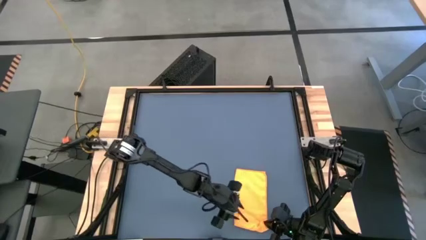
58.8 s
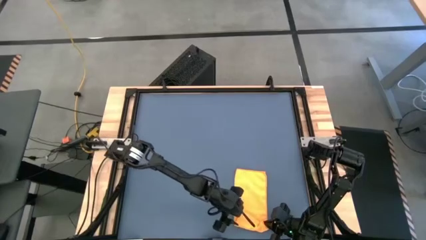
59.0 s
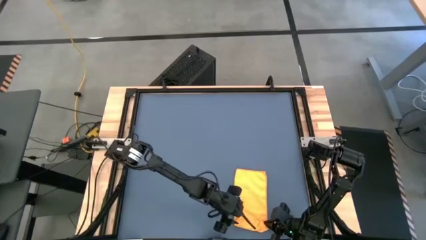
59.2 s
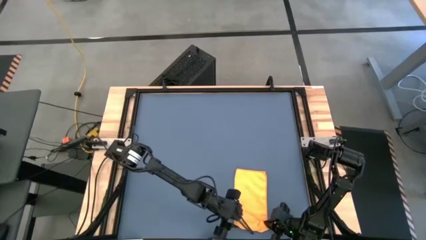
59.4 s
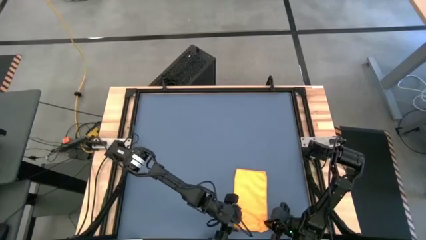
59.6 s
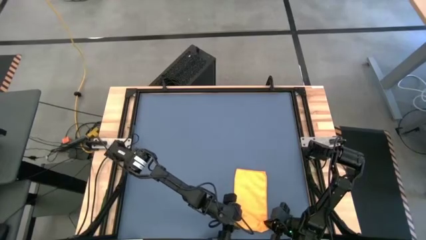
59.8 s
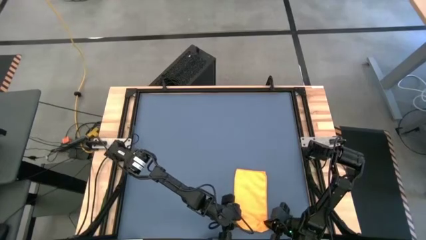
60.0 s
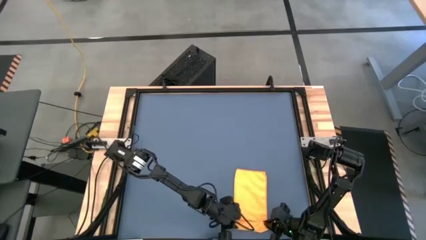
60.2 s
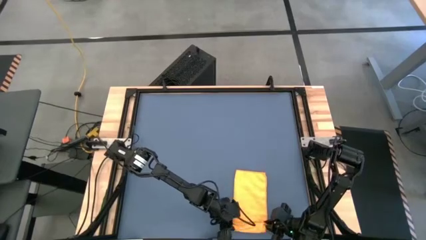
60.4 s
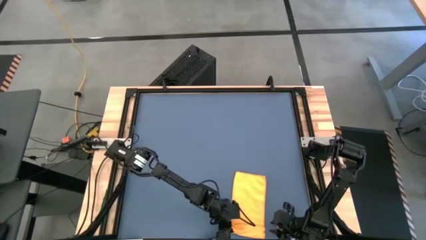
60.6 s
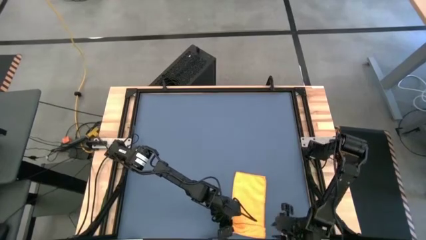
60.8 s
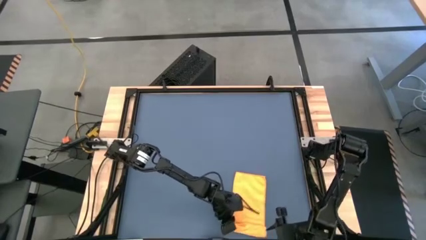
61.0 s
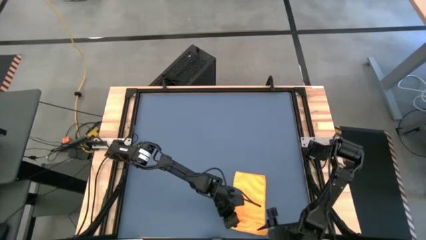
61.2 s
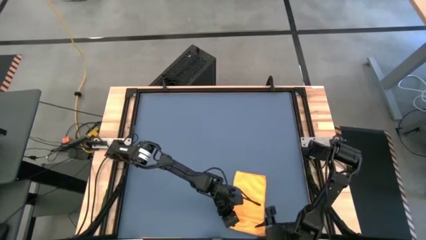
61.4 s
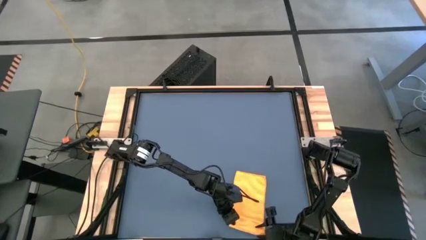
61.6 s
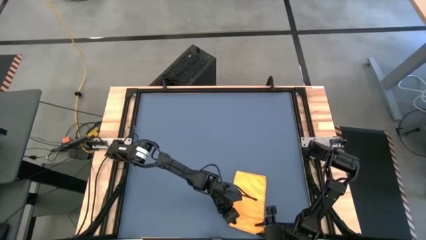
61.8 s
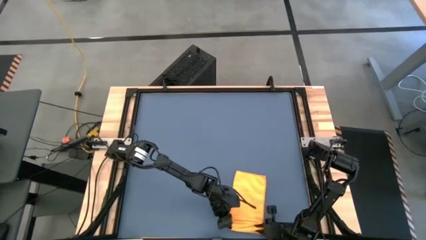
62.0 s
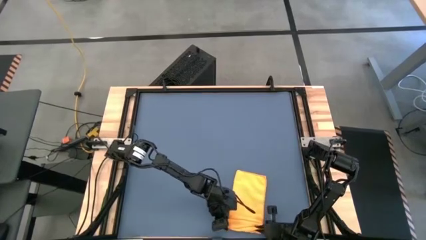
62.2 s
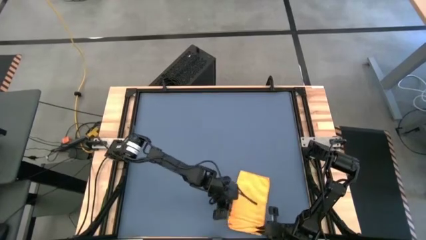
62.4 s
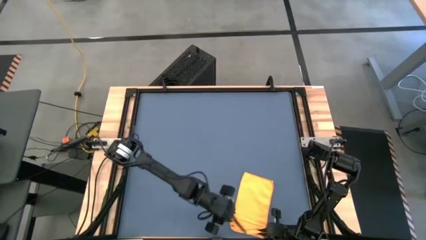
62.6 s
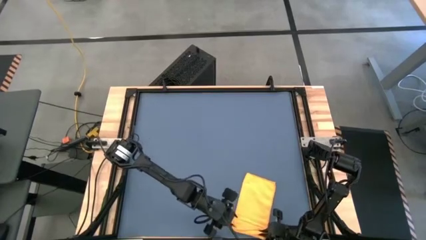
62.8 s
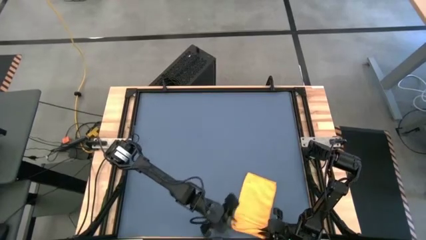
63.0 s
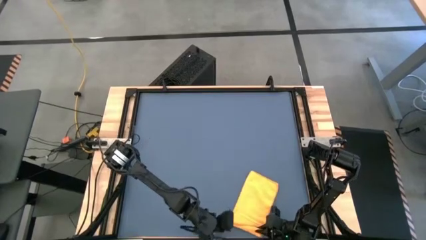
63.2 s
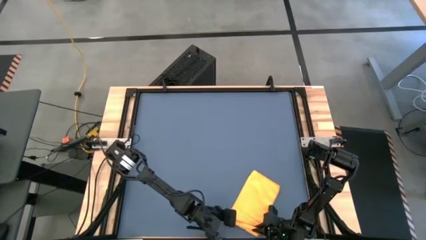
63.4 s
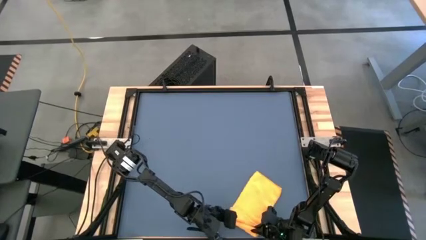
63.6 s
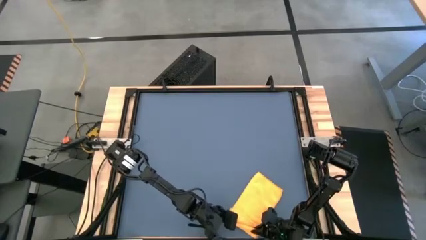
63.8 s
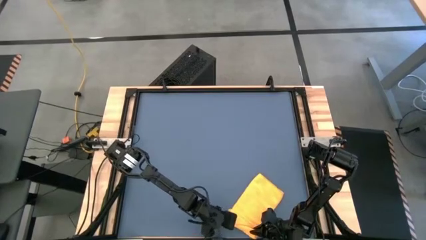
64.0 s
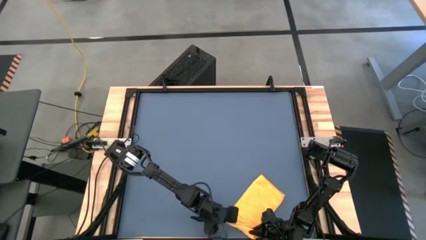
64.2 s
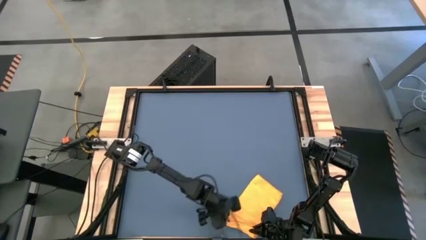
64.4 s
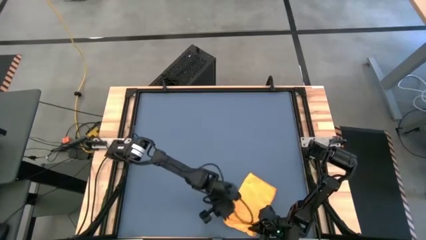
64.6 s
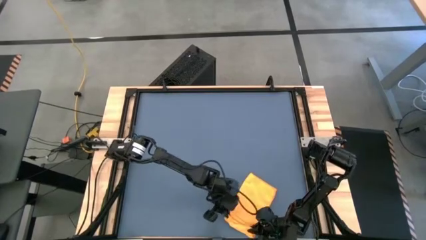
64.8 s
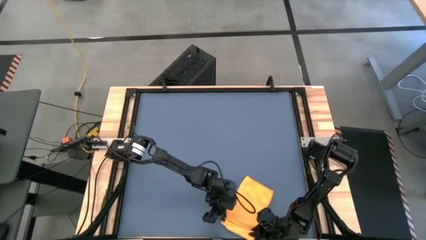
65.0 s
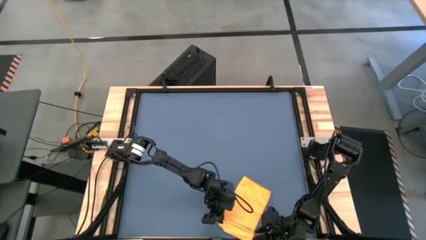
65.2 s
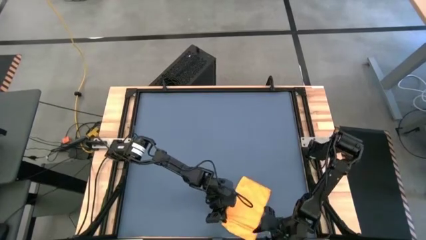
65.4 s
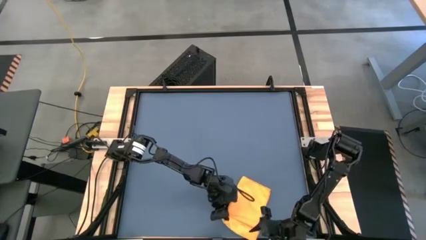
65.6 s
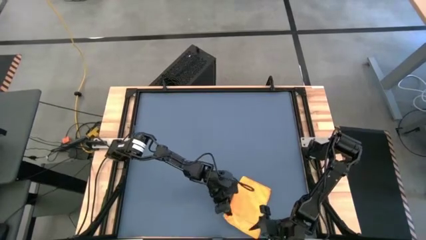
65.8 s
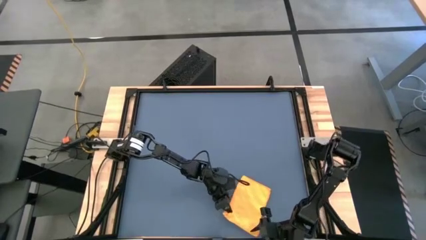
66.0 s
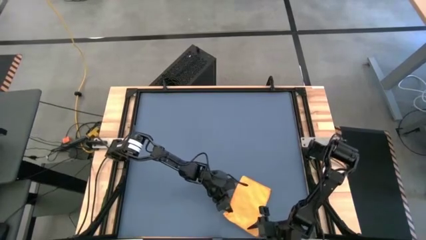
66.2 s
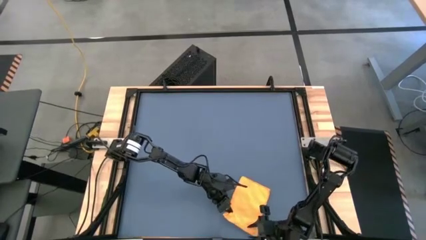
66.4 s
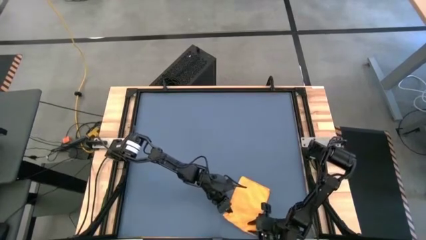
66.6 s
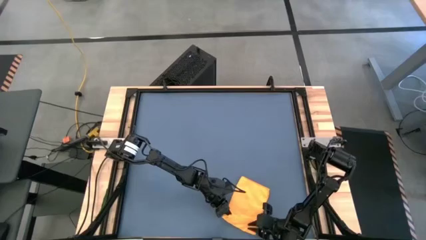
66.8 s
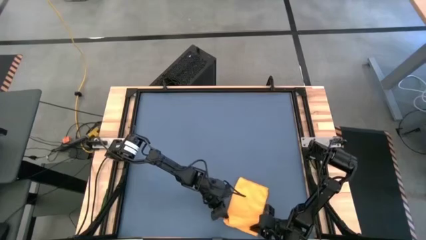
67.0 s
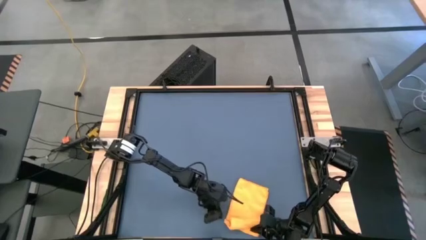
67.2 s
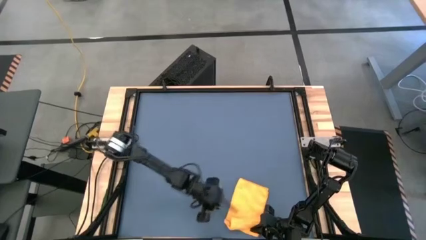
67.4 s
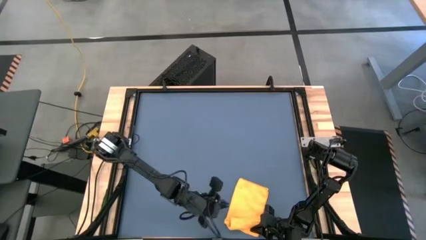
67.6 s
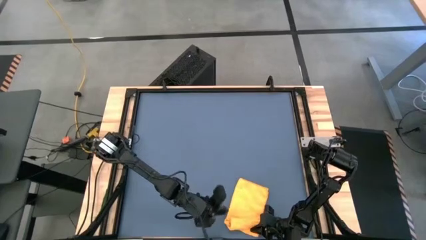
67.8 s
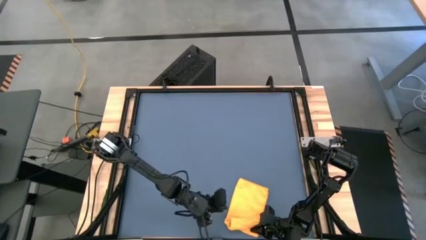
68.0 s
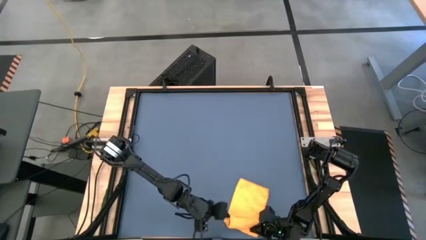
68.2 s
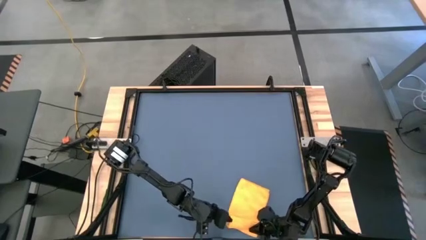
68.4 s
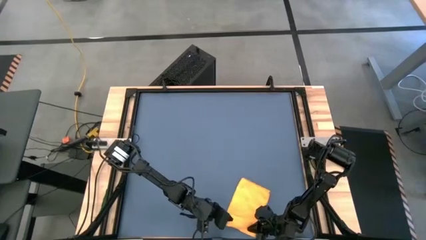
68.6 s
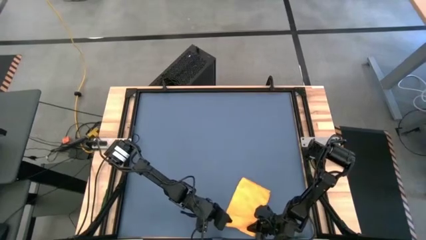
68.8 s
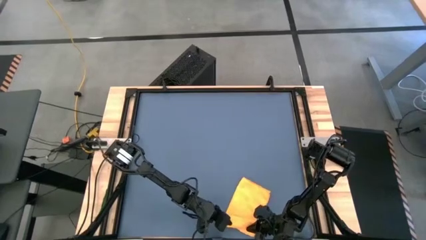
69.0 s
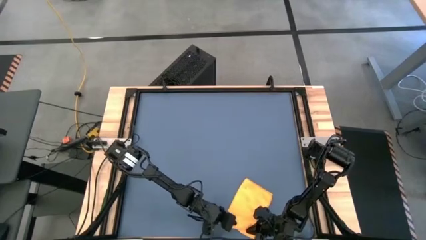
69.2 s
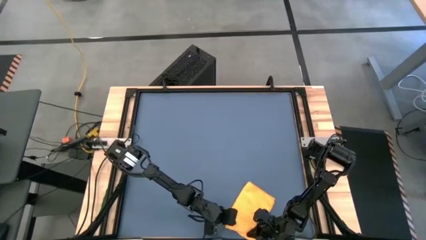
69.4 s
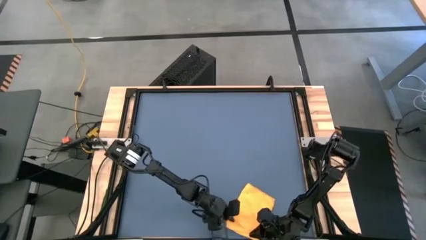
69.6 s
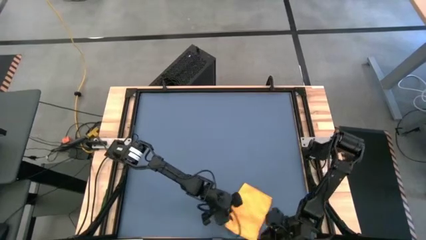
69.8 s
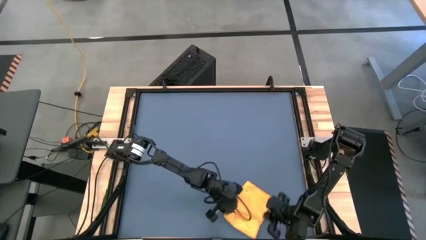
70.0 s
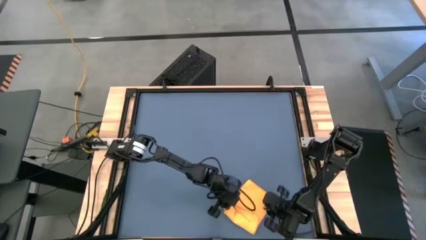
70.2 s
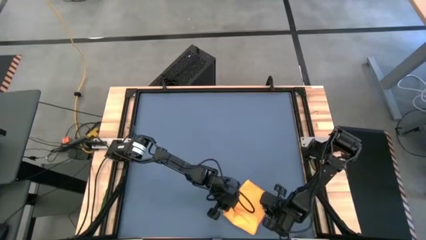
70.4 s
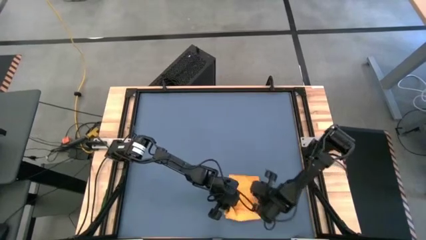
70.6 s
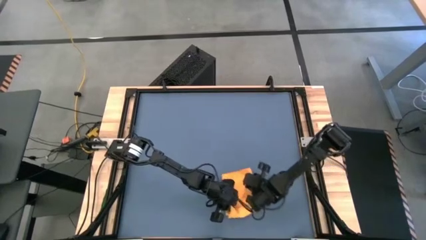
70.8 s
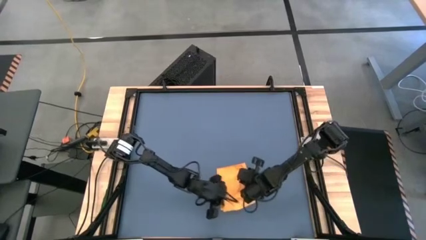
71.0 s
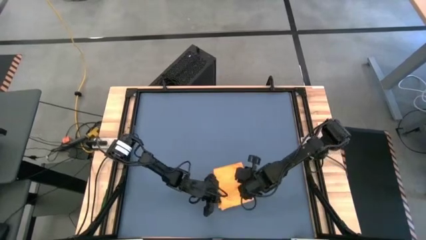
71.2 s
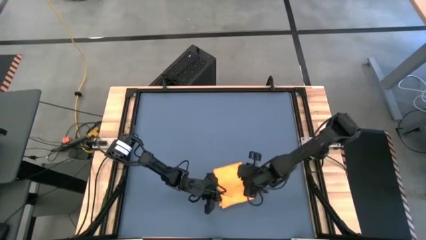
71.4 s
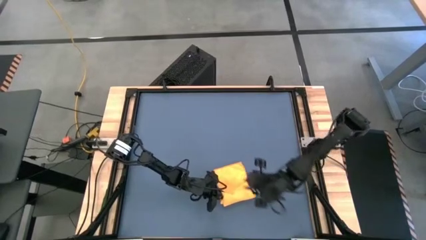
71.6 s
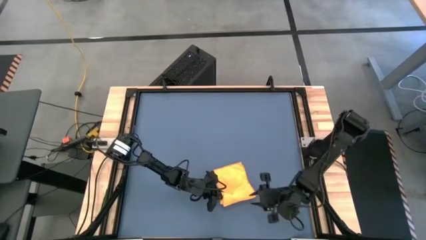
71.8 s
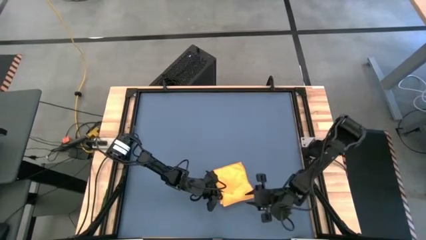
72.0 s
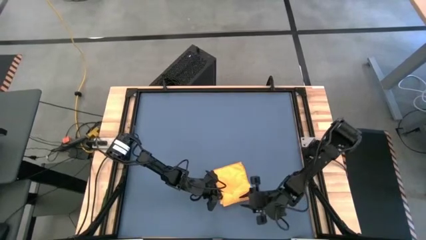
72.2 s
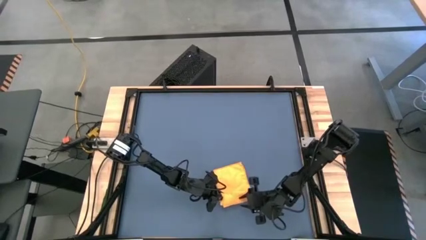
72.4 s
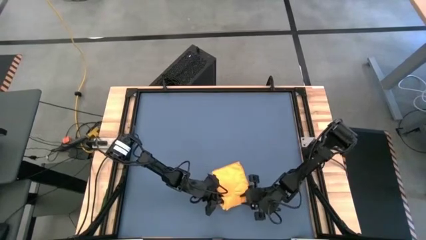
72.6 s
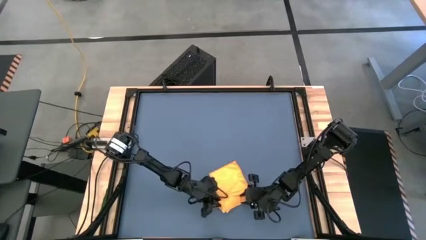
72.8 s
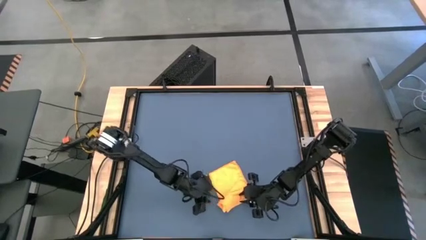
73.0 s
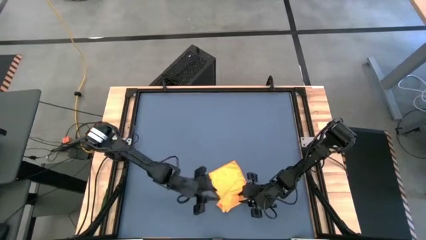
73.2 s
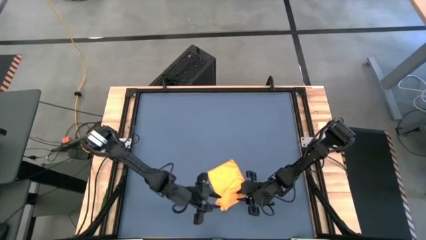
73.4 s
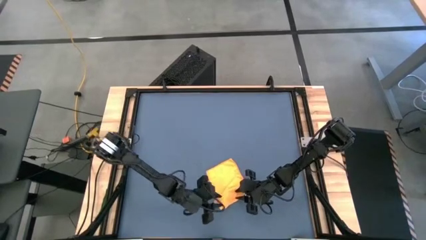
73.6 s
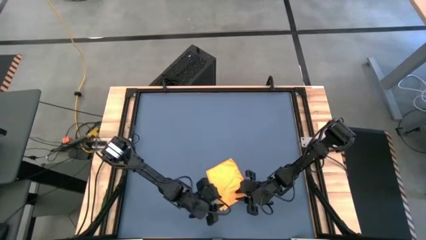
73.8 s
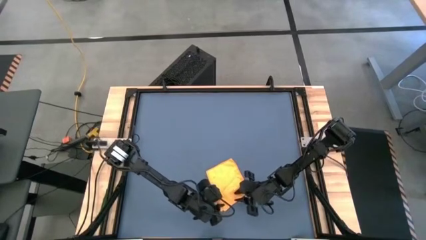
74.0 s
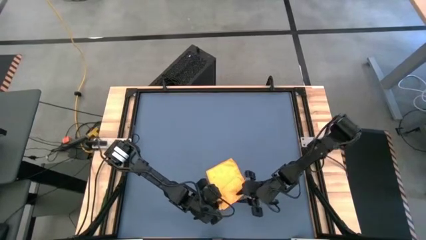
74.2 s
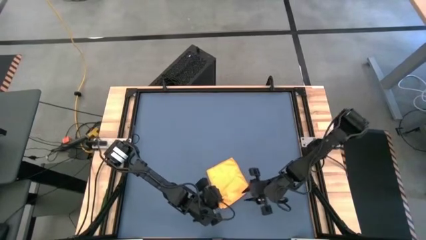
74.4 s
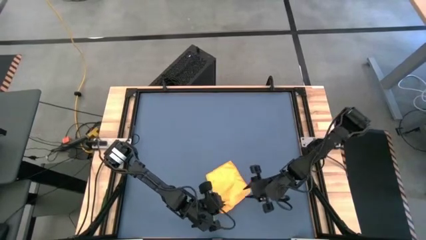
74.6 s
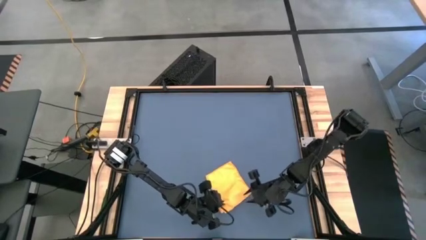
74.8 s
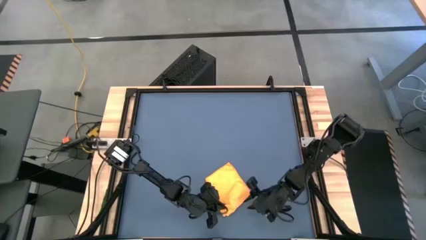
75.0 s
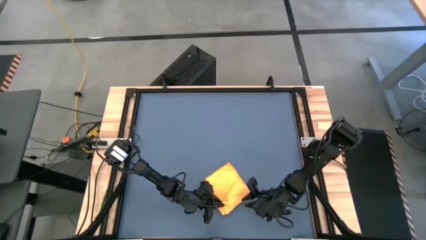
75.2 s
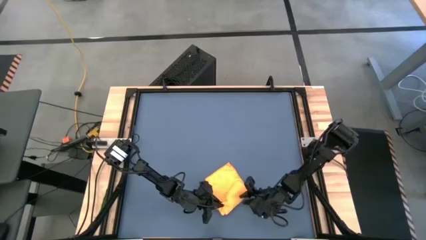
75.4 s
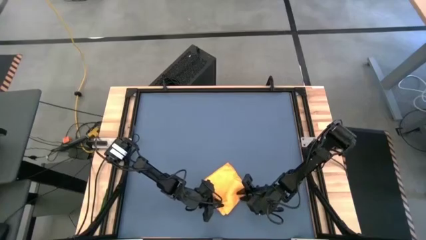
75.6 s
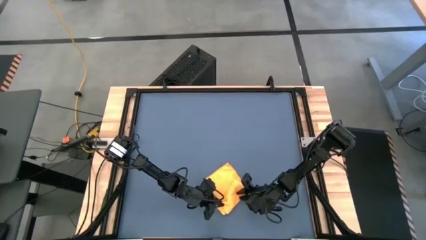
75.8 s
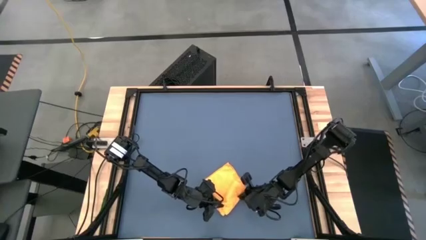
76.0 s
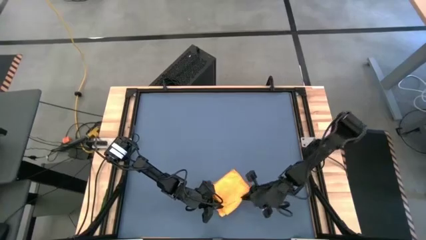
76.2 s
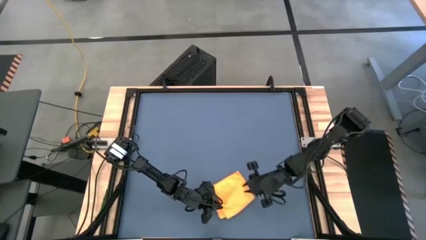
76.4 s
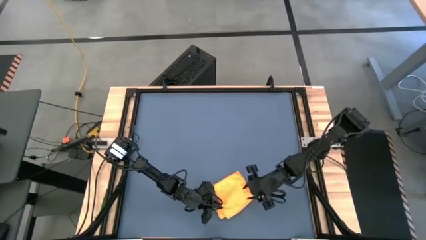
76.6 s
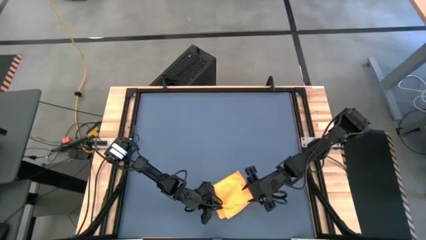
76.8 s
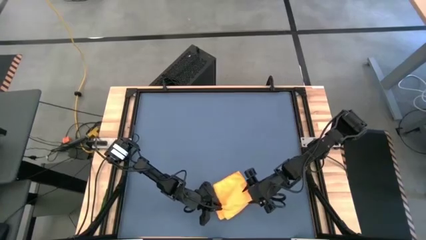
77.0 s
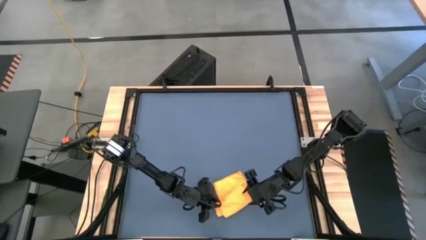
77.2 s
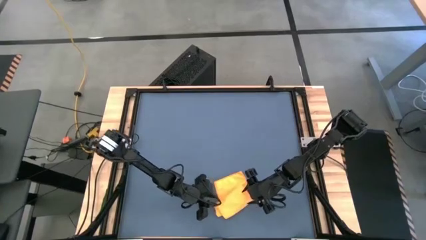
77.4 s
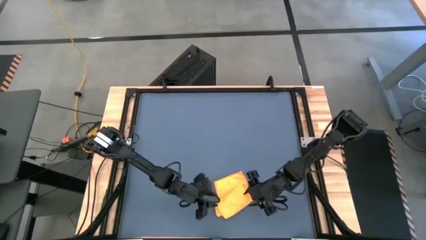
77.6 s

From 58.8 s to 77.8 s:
Task: Roll towel
Roll the yellow microfiber towel
